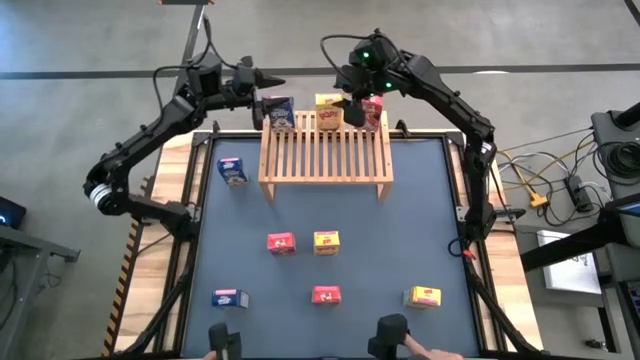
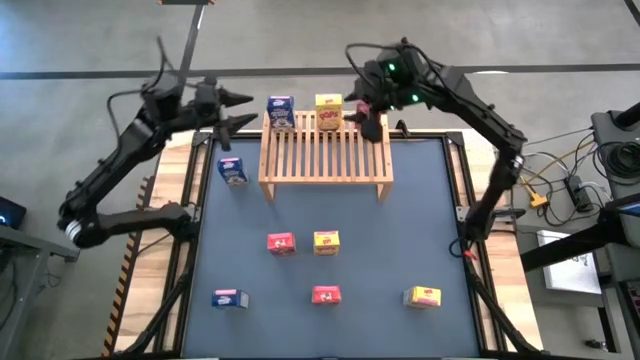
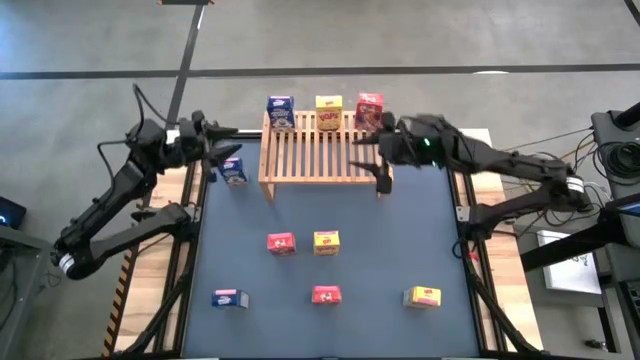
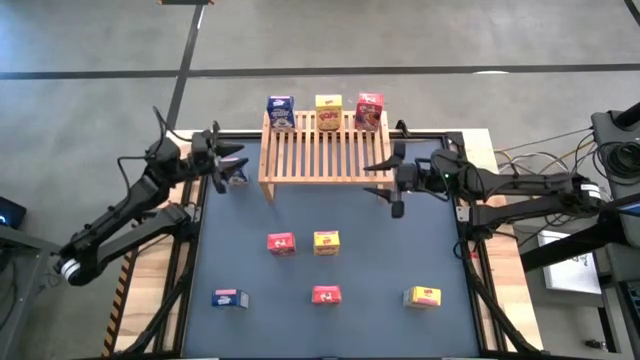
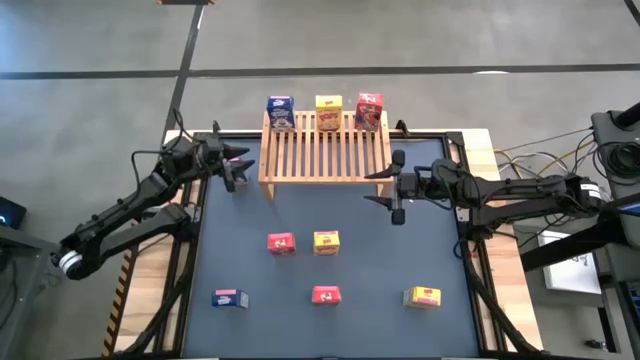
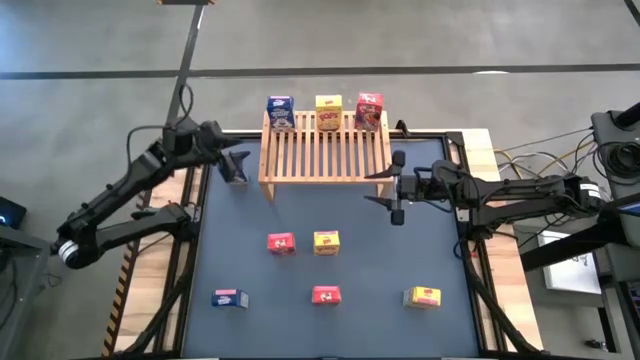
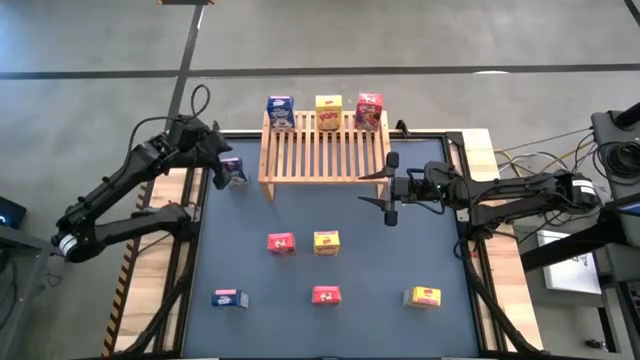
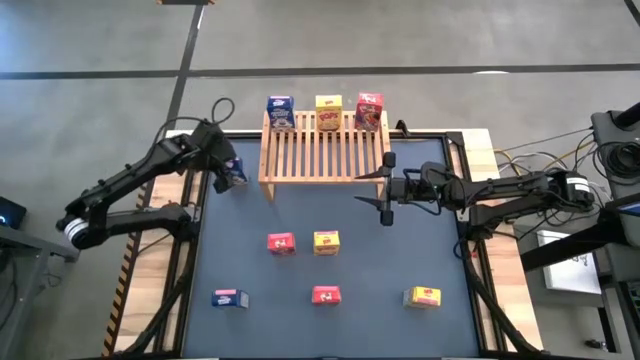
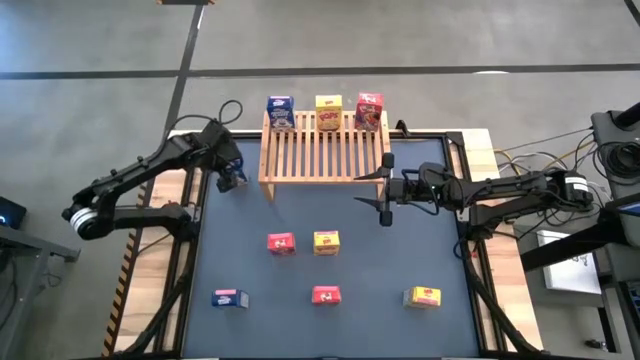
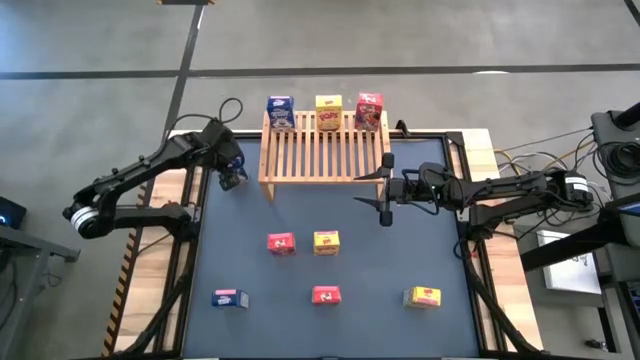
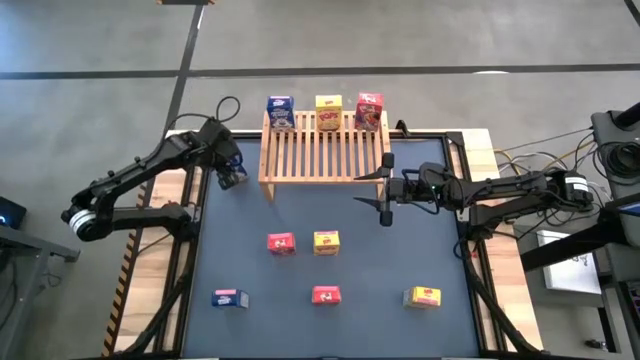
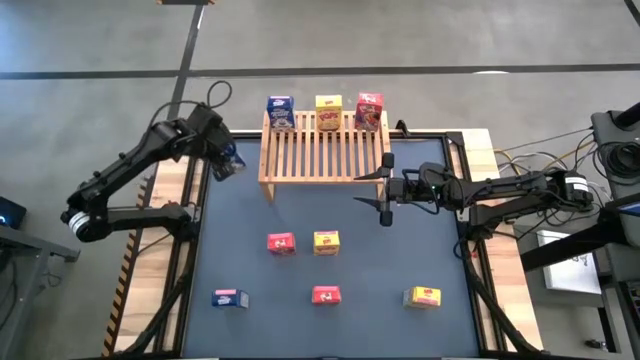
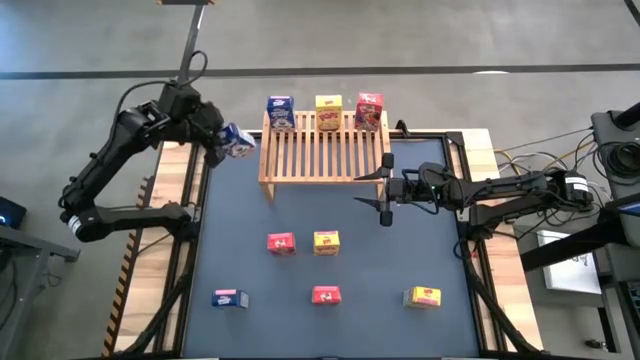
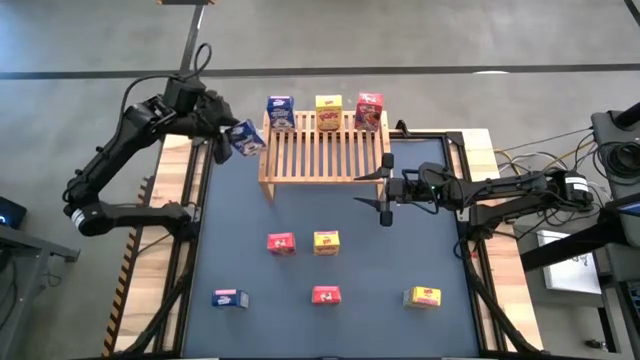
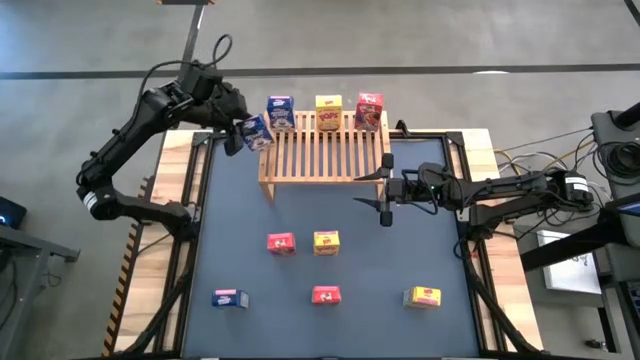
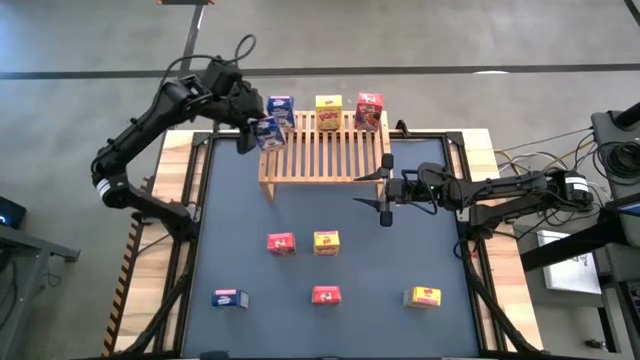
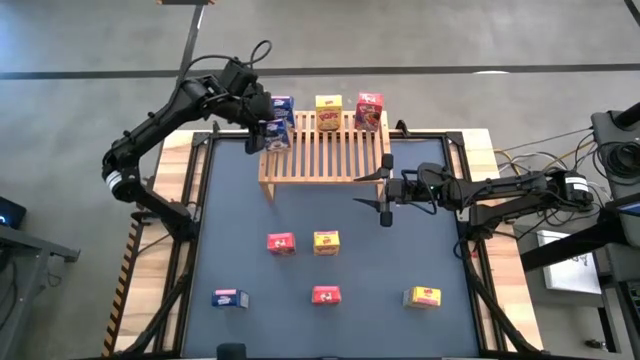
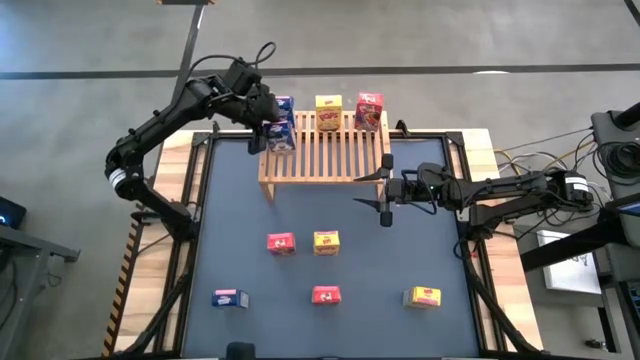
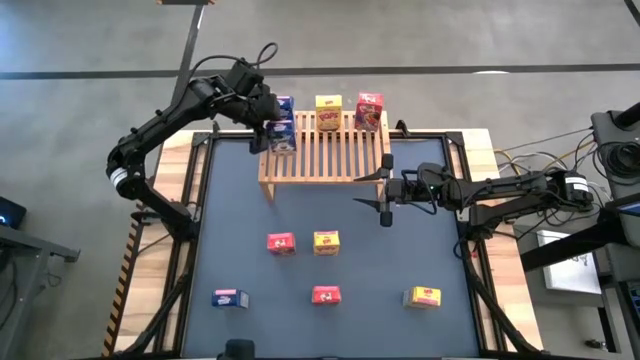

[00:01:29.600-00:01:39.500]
Task: Stack cereal on shelf
Put the top blue cereal box on the shelf aligned with the blue cereal box

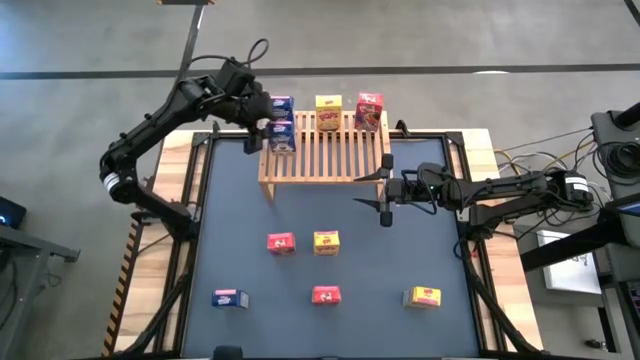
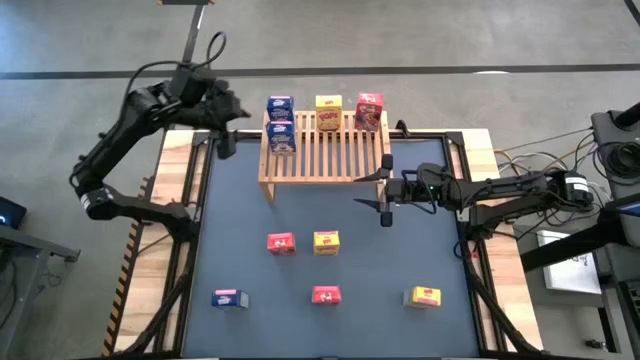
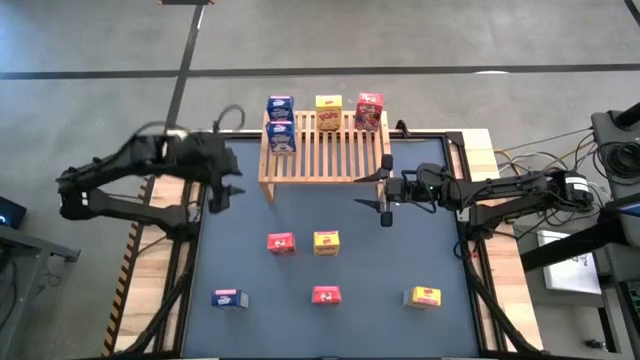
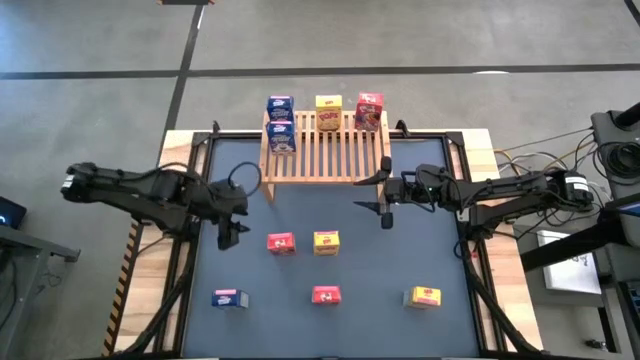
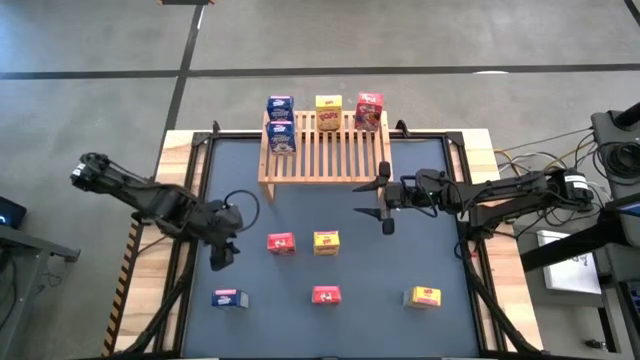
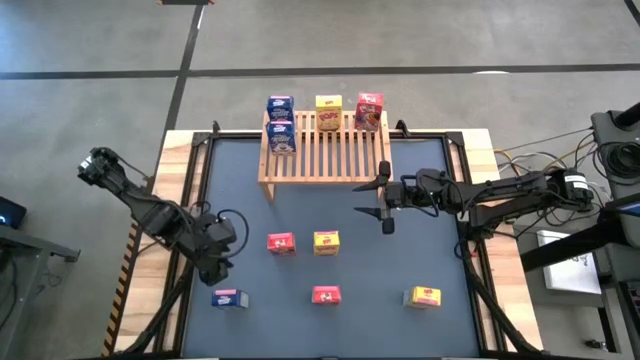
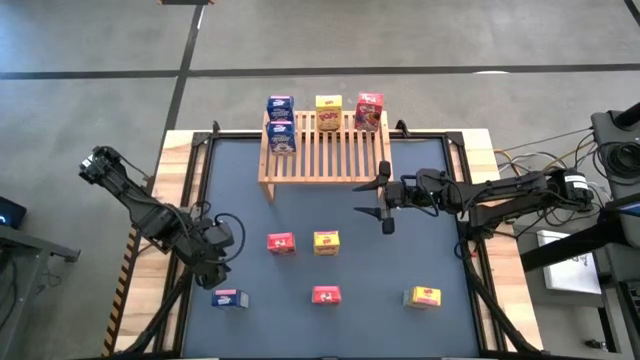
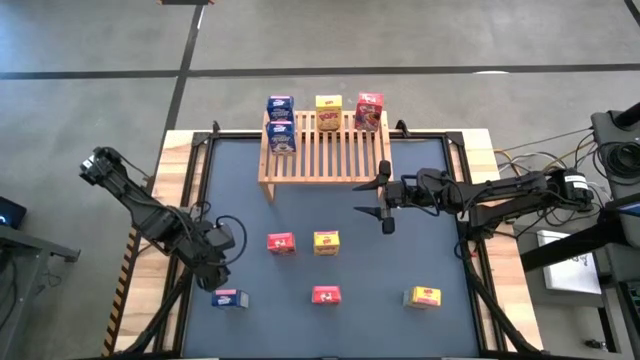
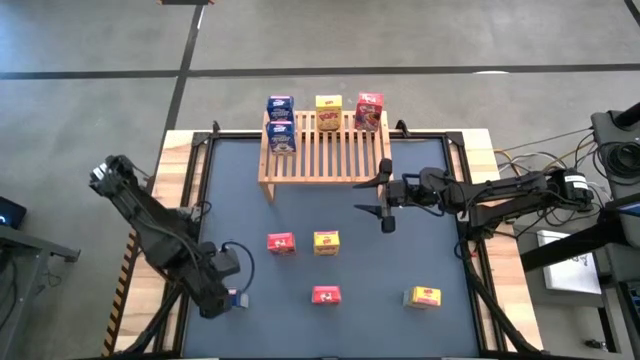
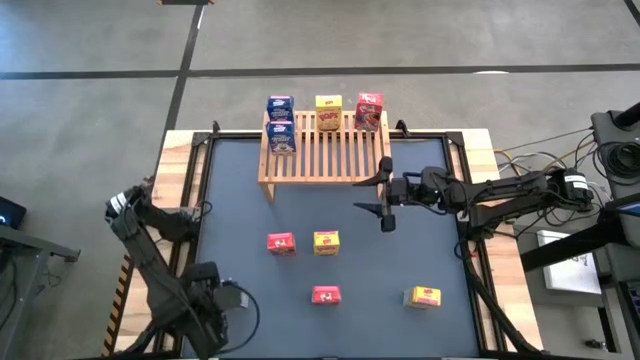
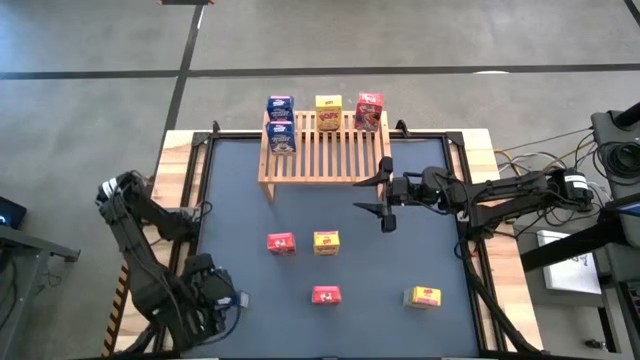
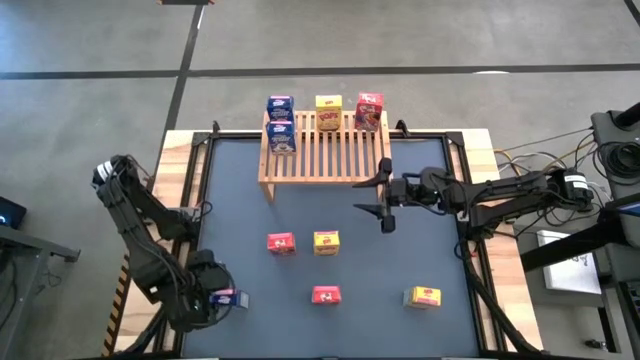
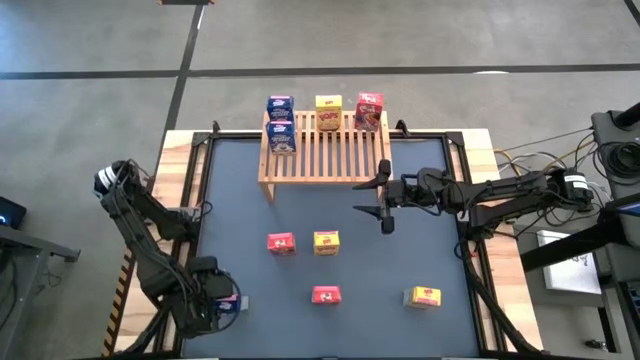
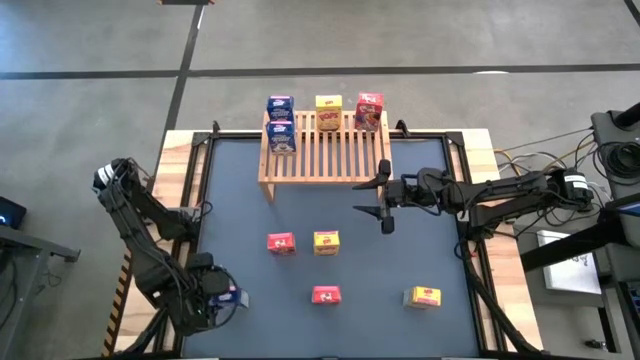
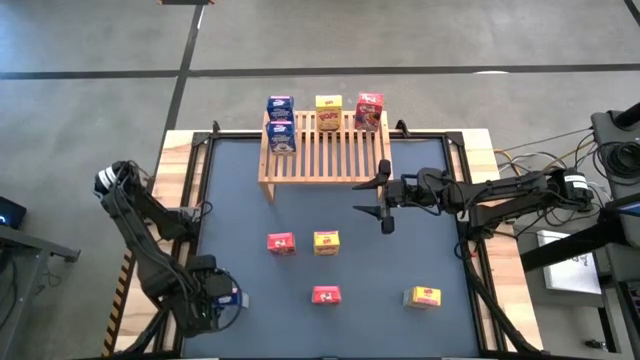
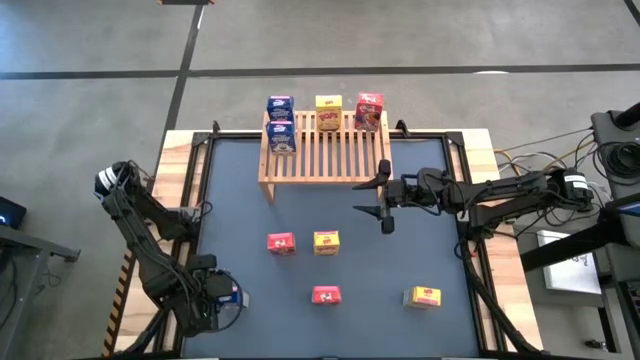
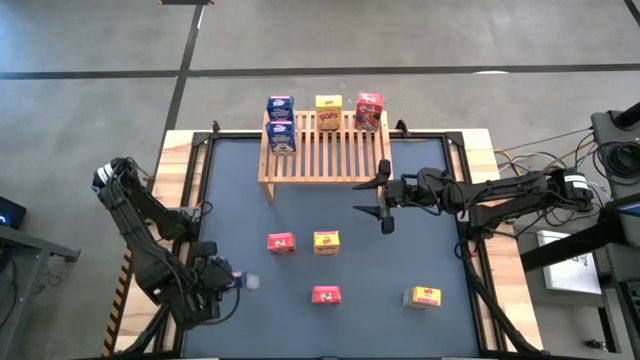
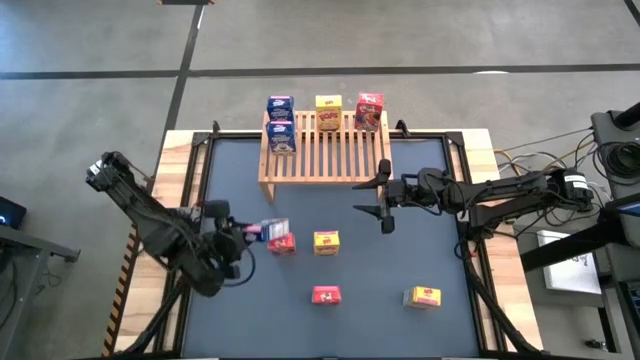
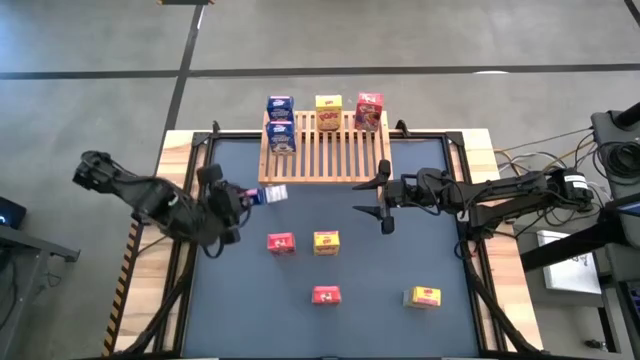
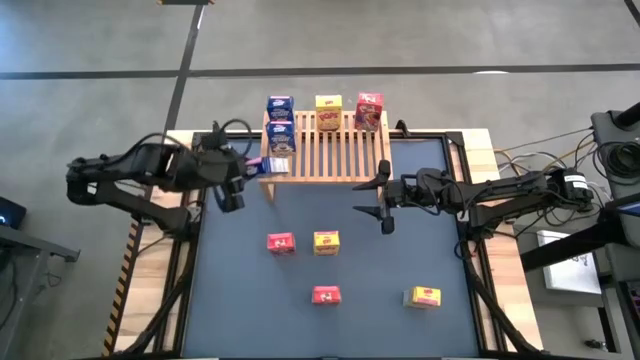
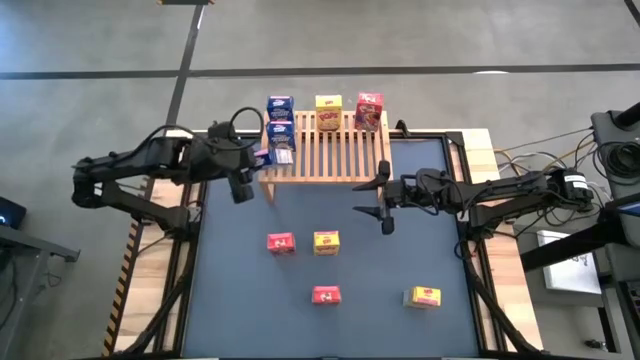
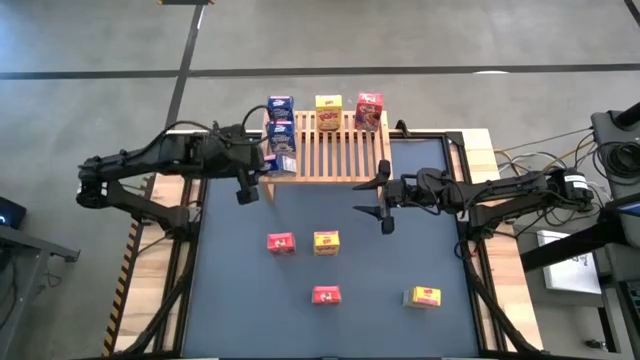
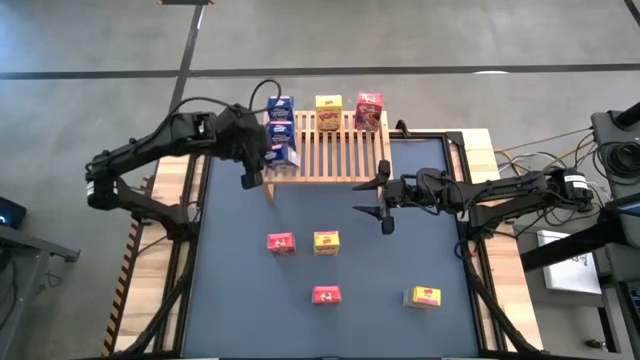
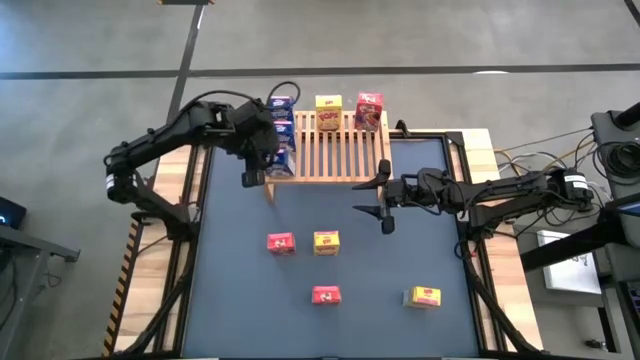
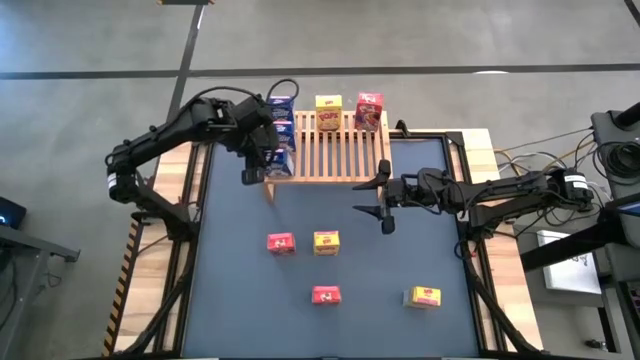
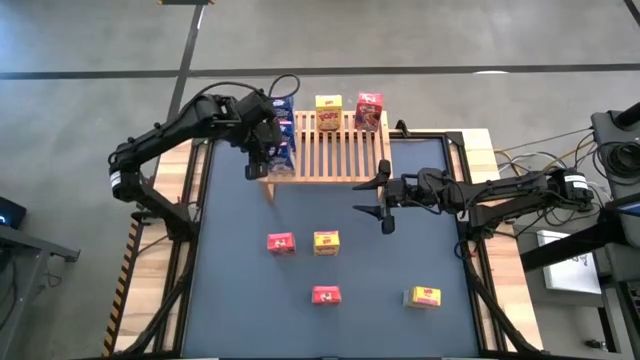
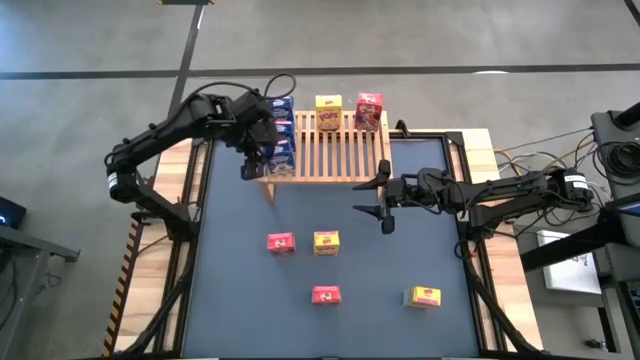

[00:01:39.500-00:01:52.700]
Put the blue cereal box on the shelf aligned with the blue cereal boxes
